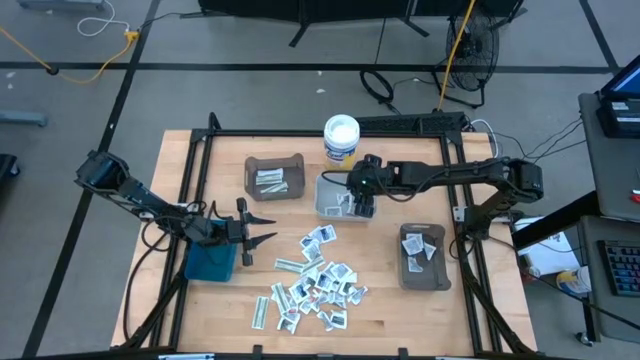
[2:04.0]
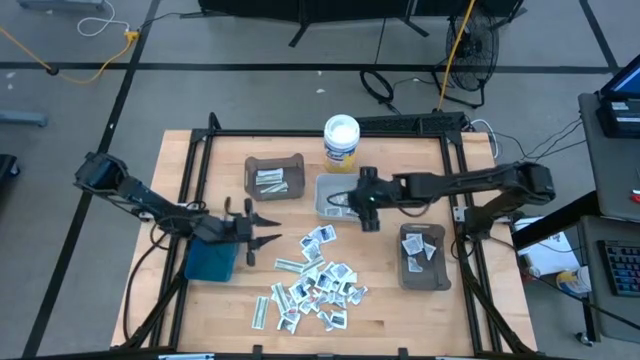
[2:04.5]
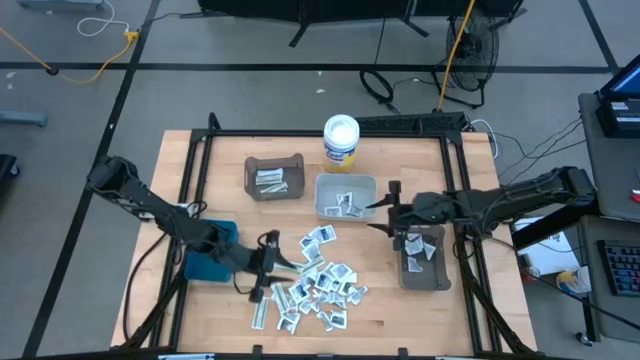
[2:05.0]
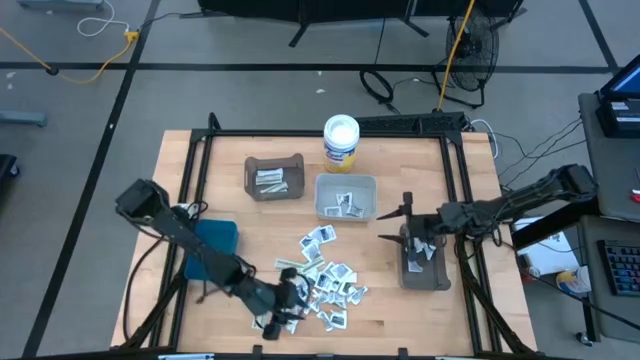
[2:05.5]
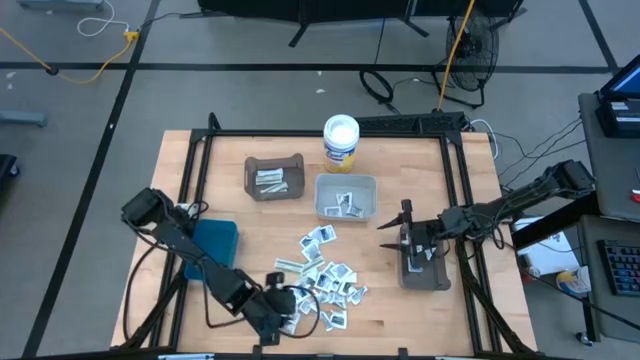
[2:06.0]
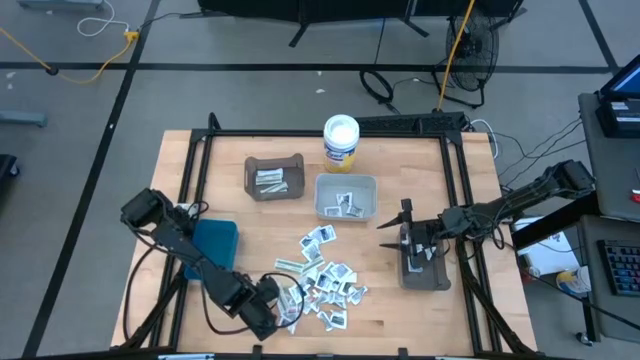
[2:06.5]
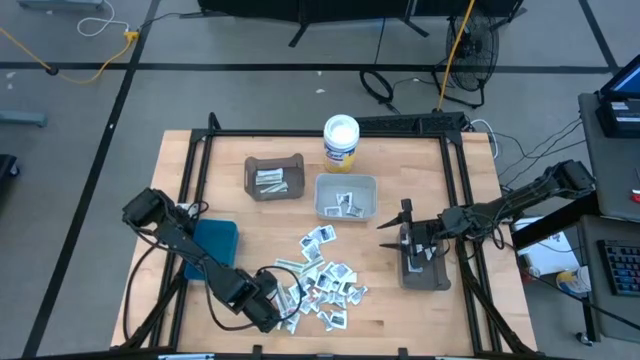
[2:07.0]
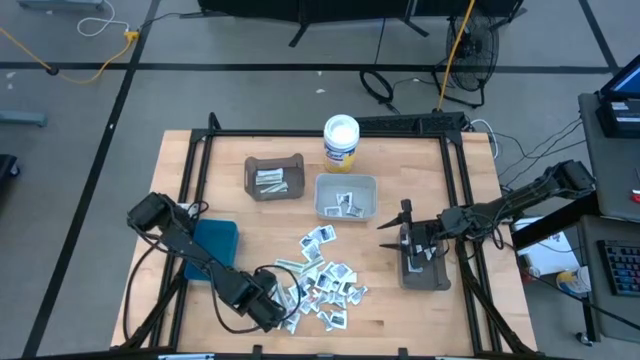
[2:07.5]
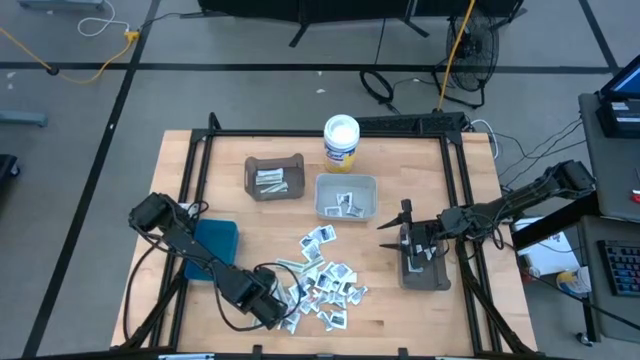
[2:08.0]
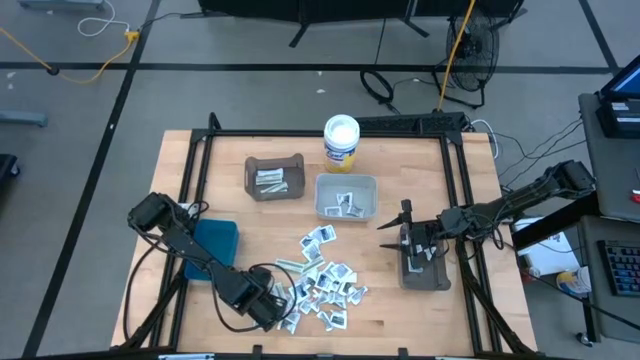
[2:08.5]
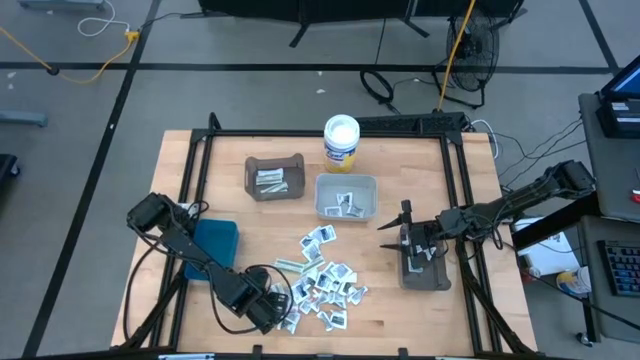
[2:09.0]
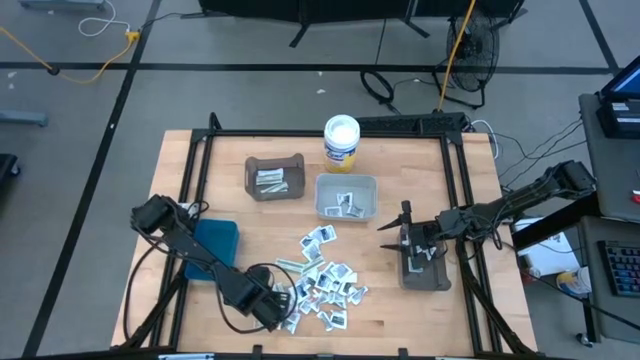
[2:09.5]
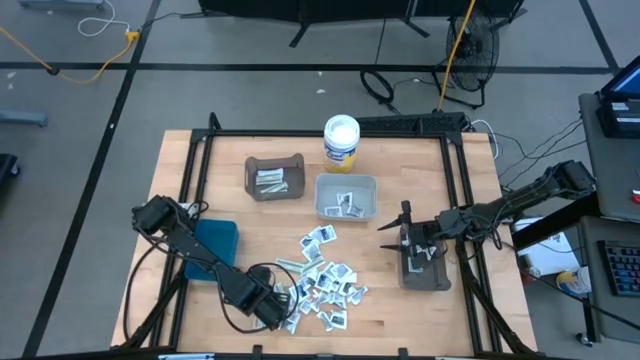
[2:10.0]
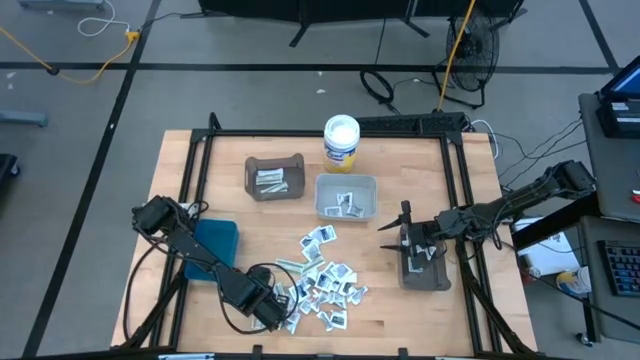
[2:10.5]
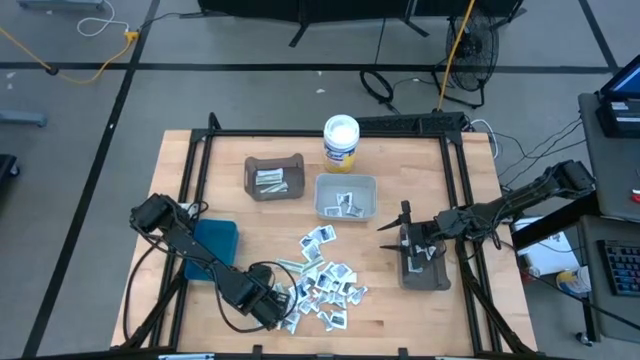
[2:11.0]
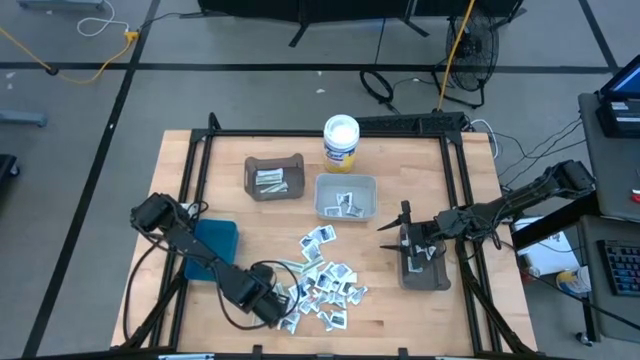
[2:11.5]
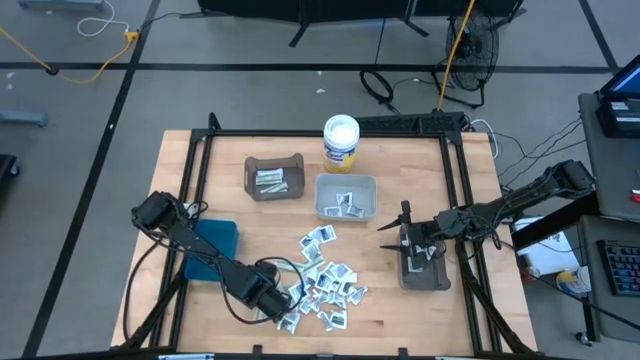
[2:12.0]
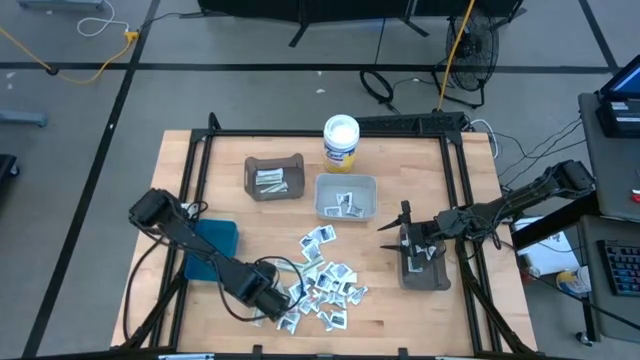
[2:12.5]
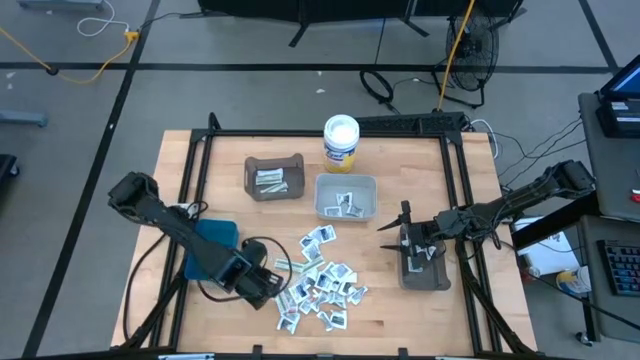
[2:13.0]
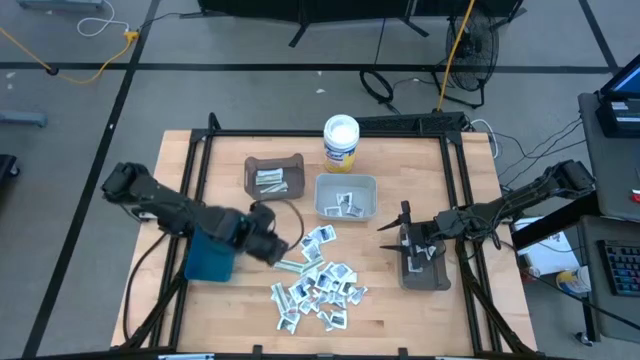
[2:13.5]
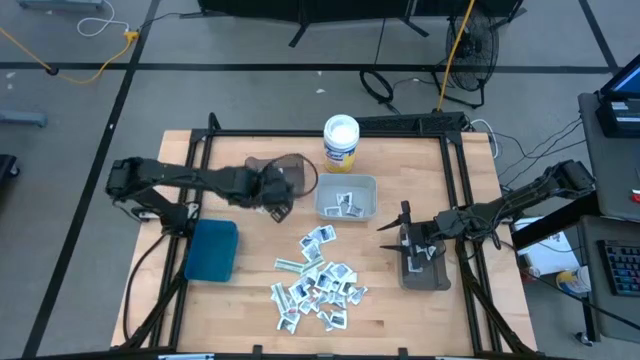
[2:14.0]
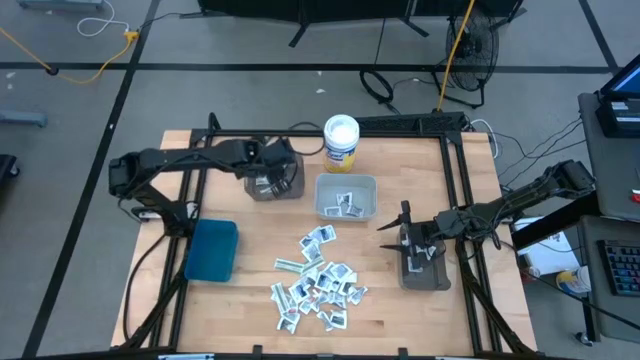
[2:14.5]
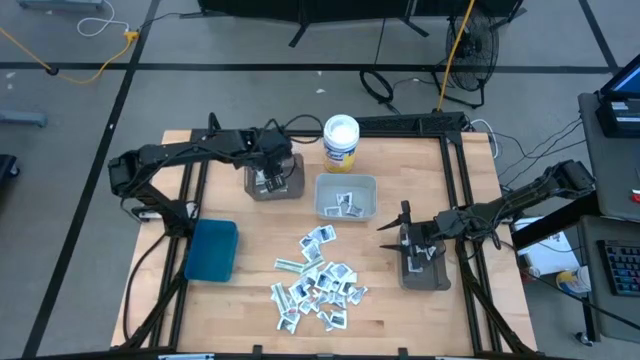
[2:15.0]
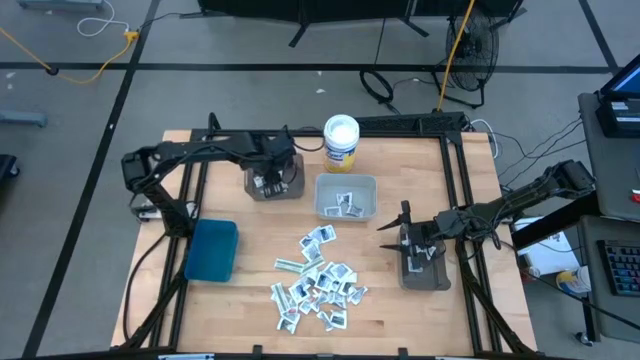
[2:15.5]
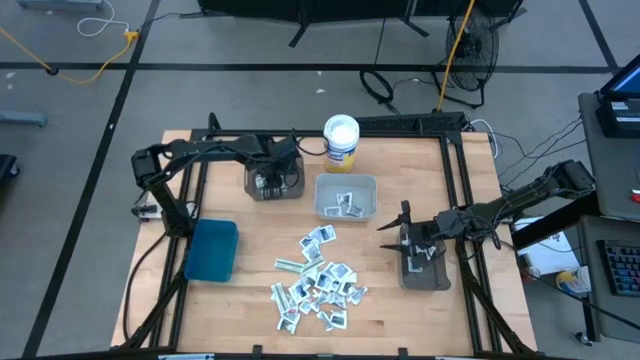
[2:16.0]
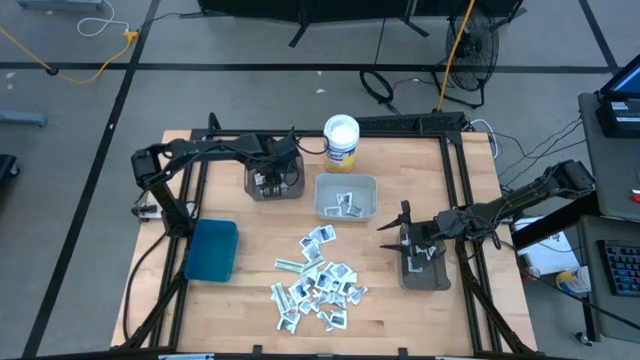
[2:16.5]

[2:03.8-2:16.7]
Task: Pick & Place First Aid Supplies
Put the green bandage pack into the top black bin

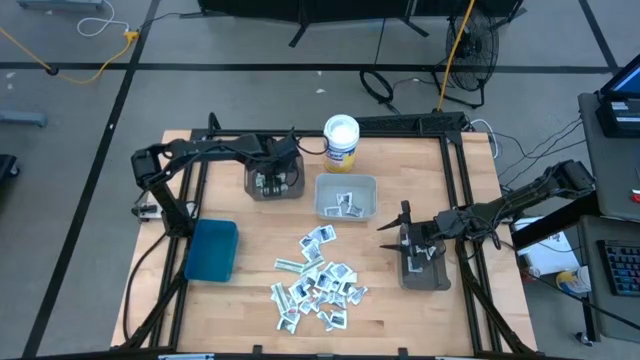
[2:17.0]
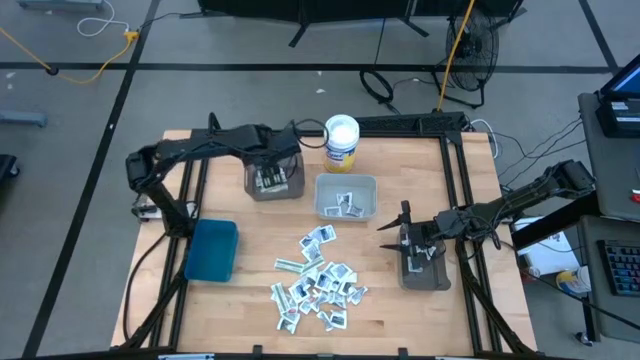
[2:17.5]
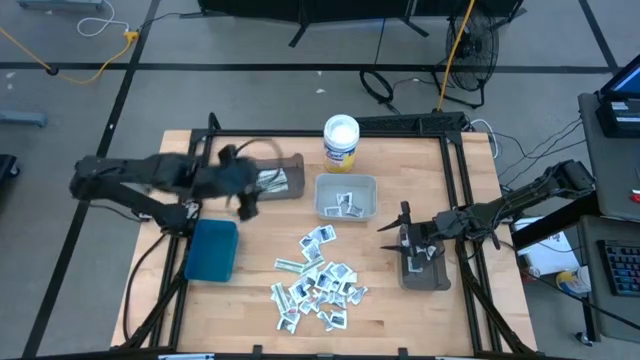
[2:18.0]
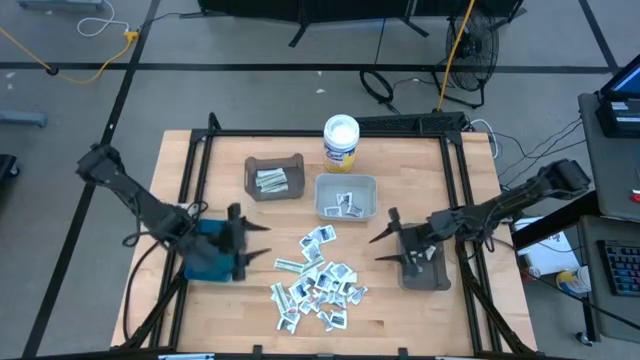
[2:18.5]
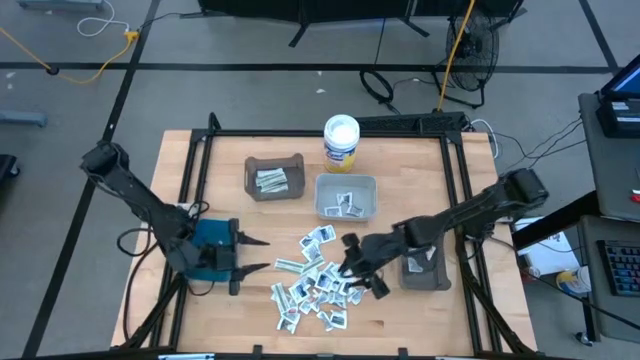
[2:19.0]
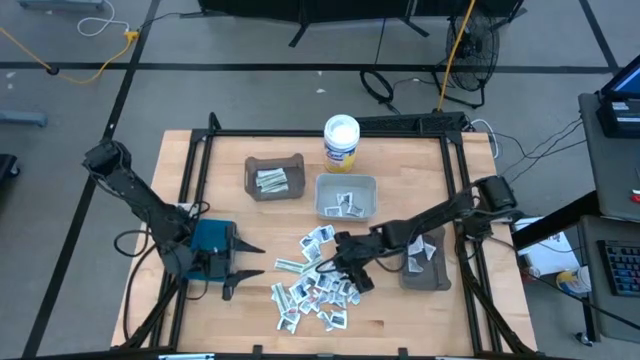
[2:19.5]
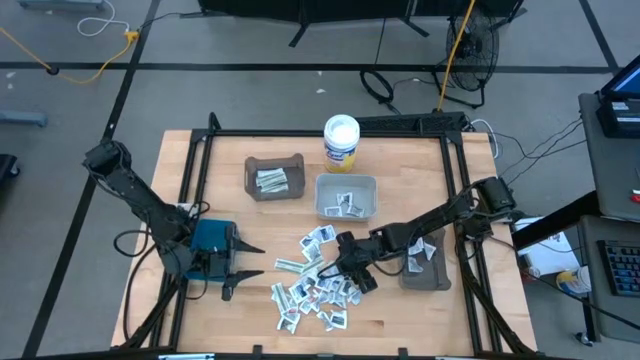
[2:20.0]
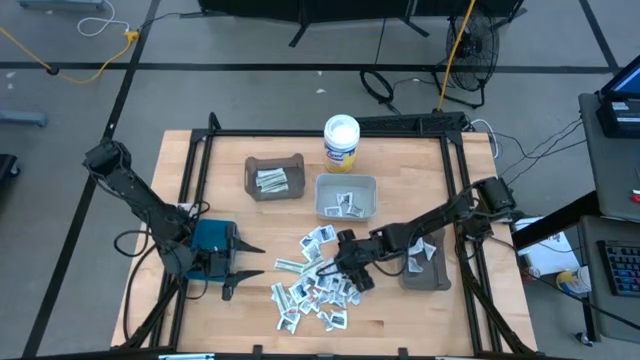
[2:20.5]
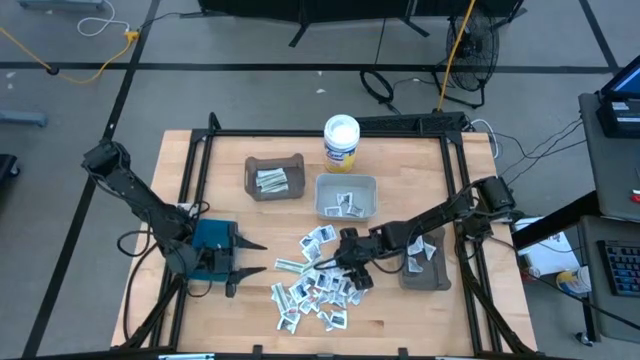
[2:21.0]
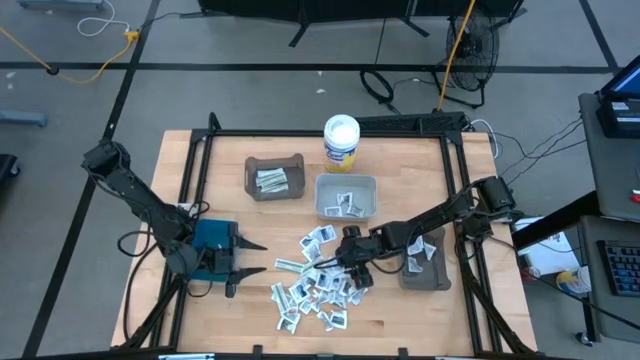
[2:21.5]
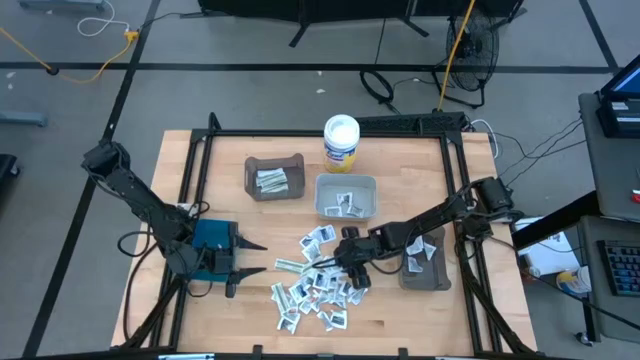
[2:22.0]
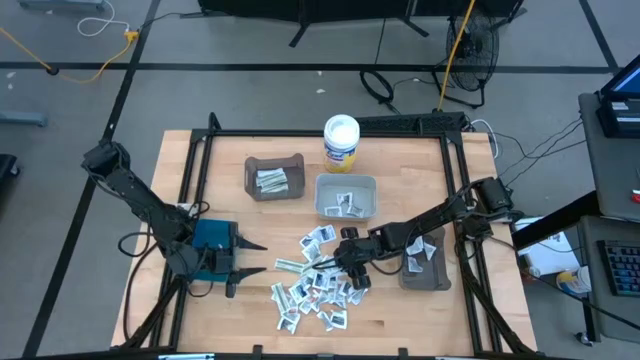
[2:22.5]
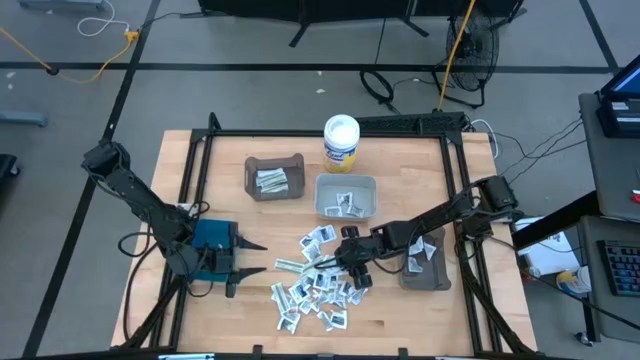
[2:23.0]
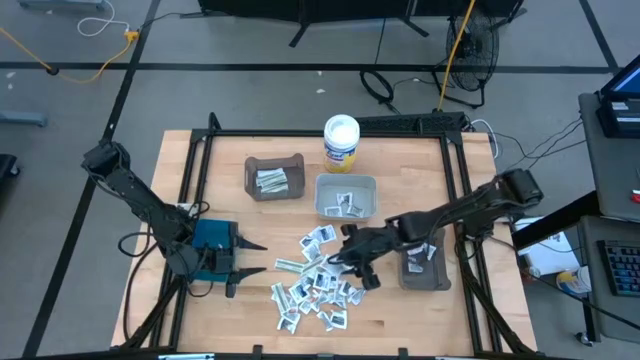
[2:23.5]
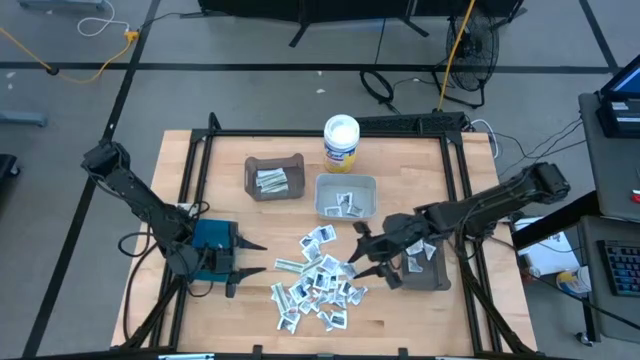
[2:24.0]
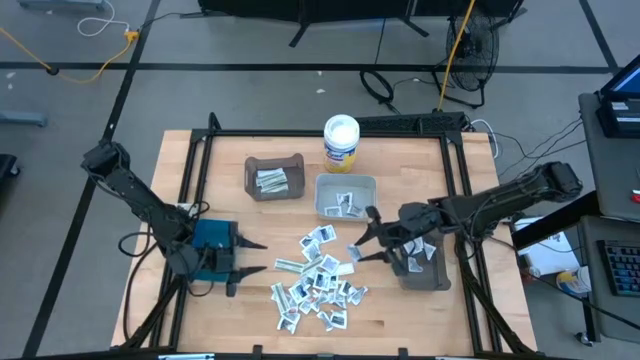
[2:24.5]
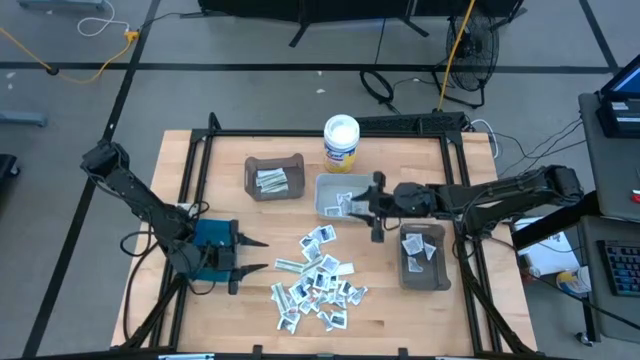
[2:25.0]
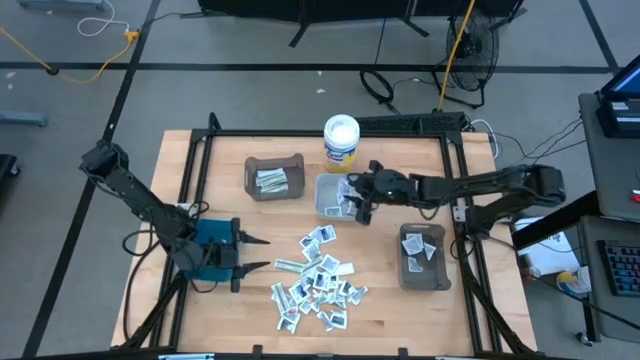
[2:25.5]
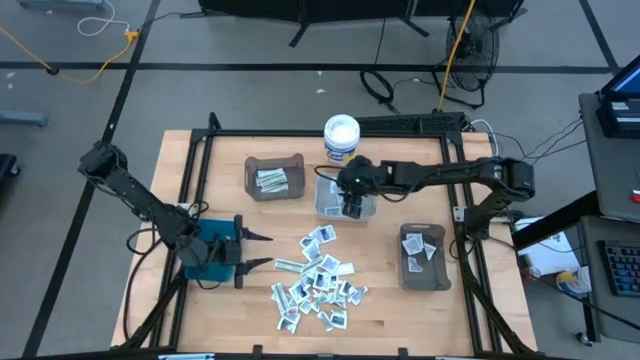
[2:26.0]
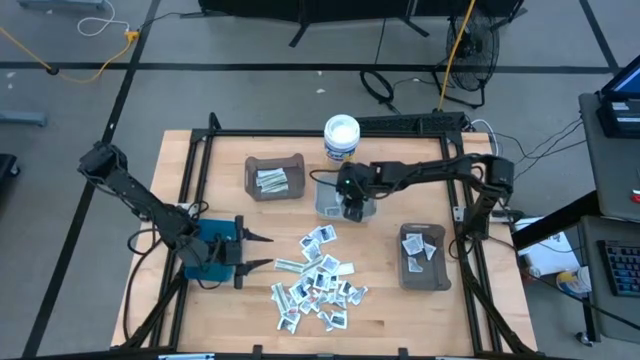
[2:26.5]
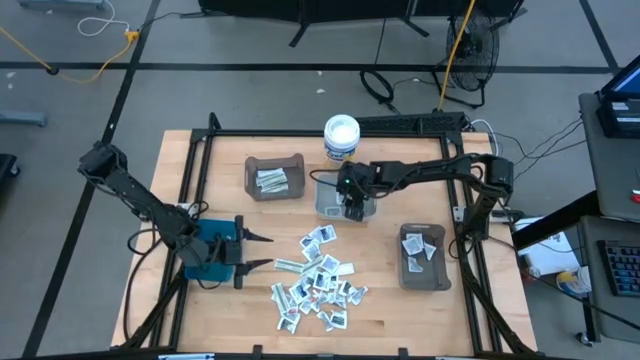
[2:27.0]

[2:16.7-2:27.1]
Put the gray towelette pack into the gray bin
